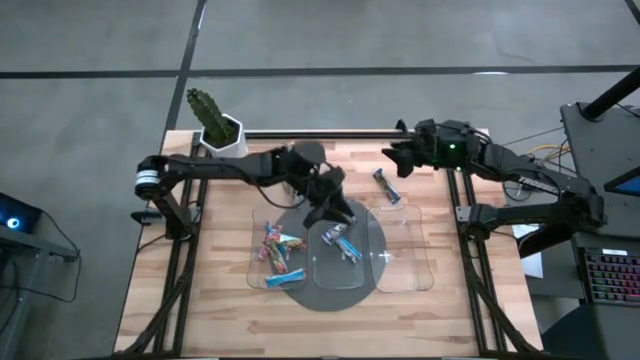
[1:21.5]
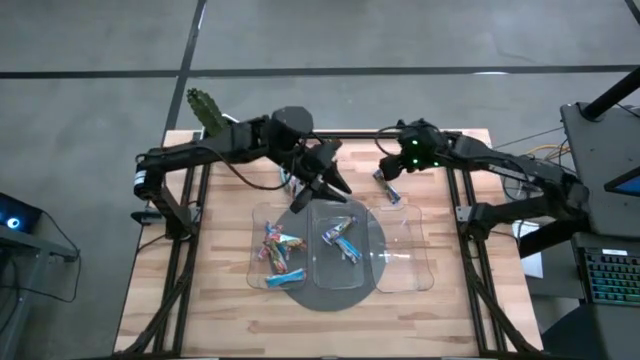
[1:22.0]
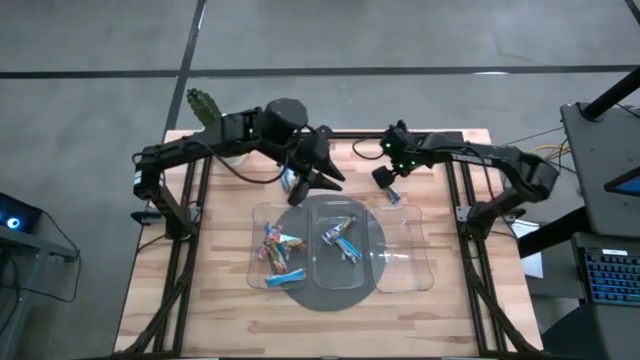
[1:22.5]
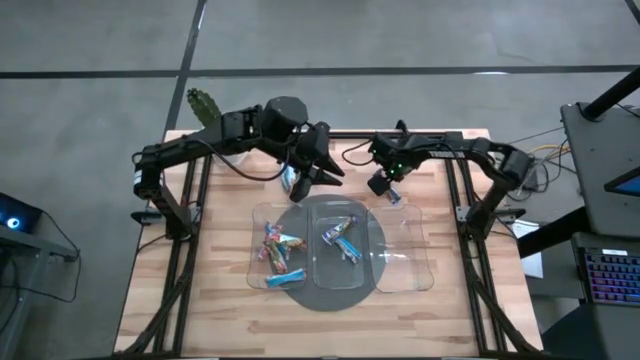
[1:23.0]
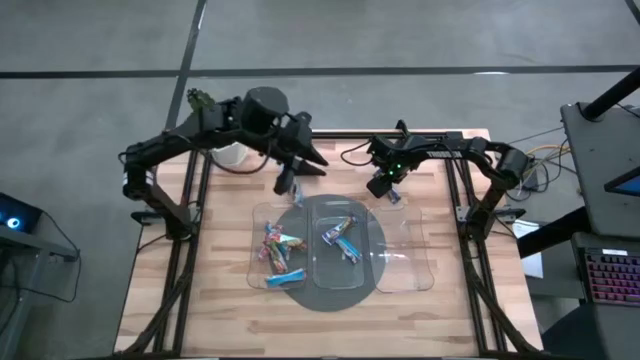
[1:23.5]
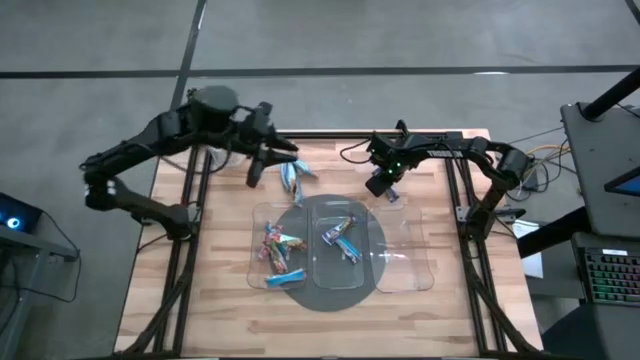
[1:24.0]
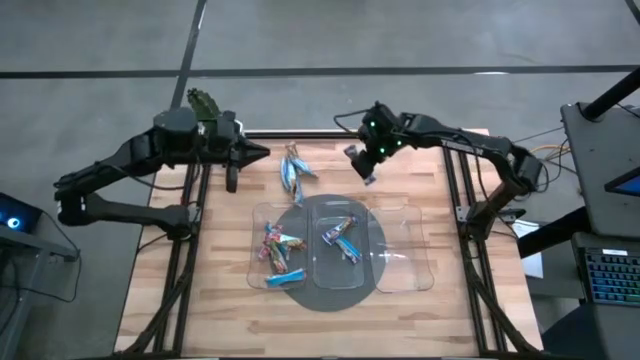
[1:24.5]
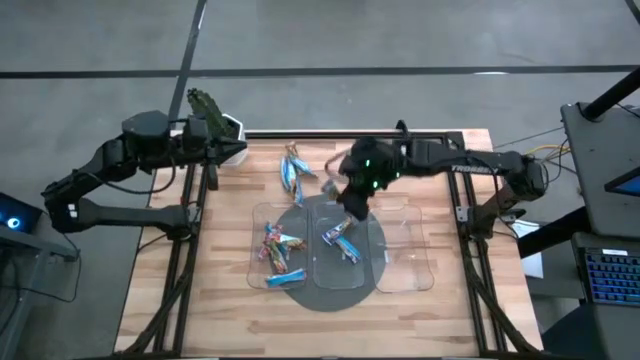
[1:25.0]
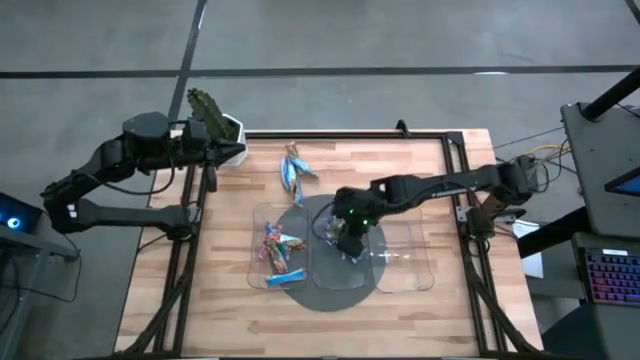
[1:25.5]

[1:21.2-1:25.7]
Task: Pick and place Granola Bars by type
Put the blue granola bar into the middle transparent bin

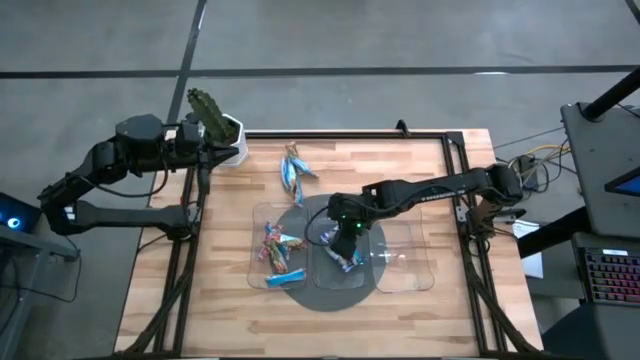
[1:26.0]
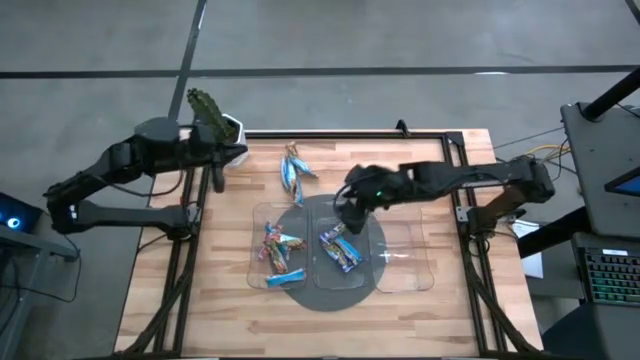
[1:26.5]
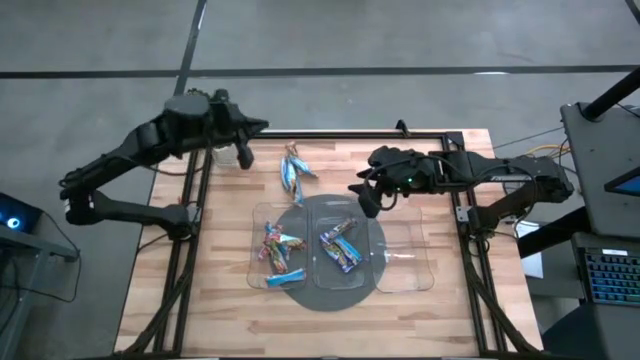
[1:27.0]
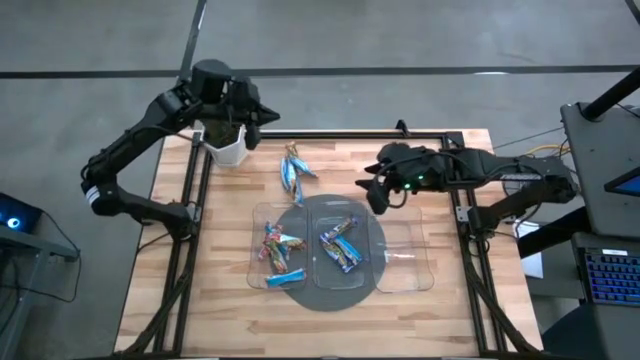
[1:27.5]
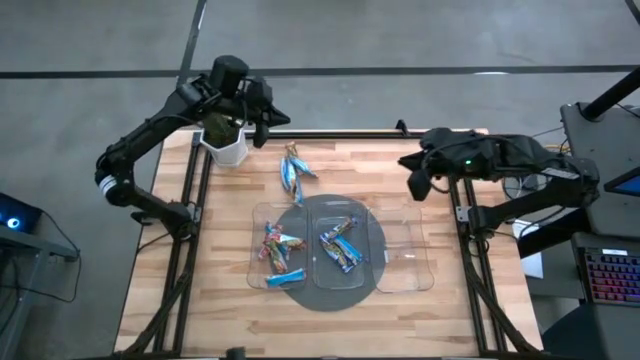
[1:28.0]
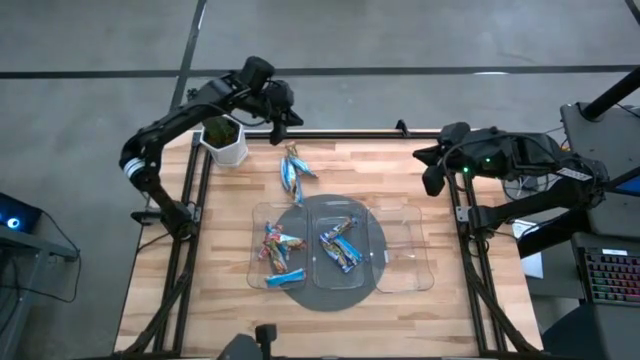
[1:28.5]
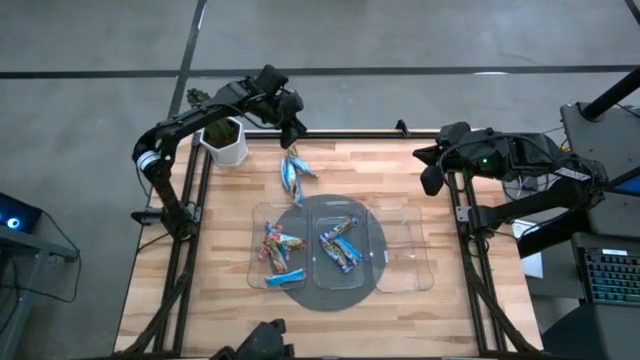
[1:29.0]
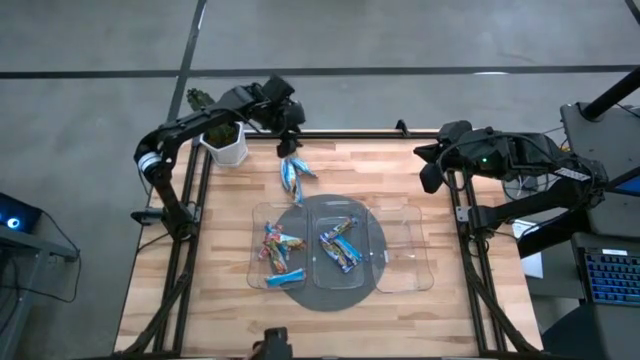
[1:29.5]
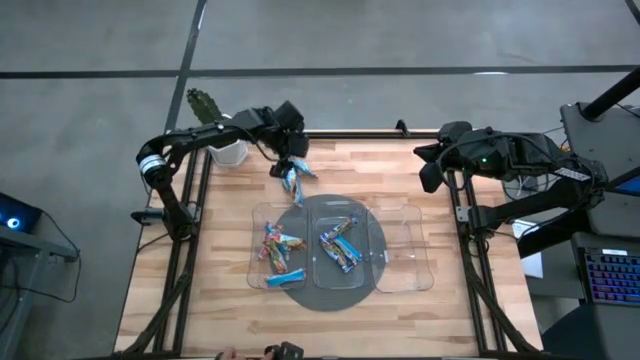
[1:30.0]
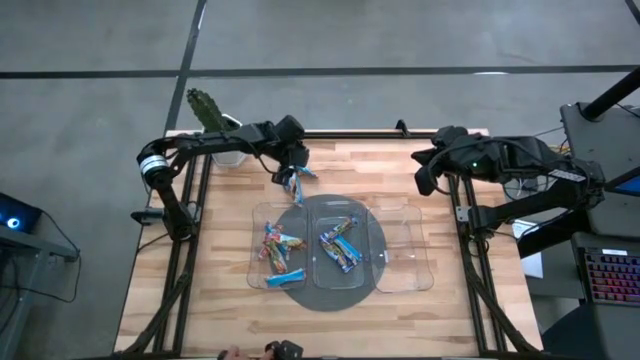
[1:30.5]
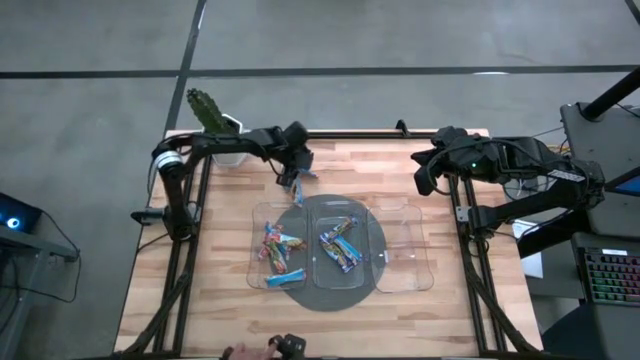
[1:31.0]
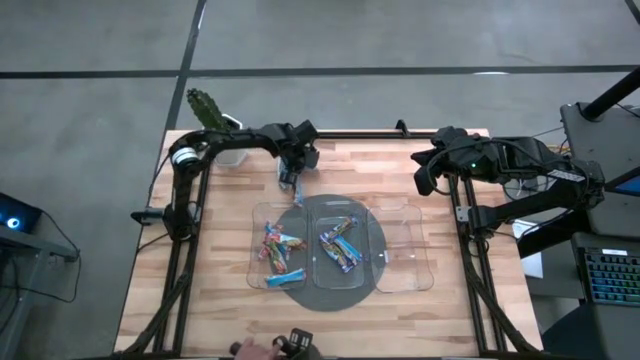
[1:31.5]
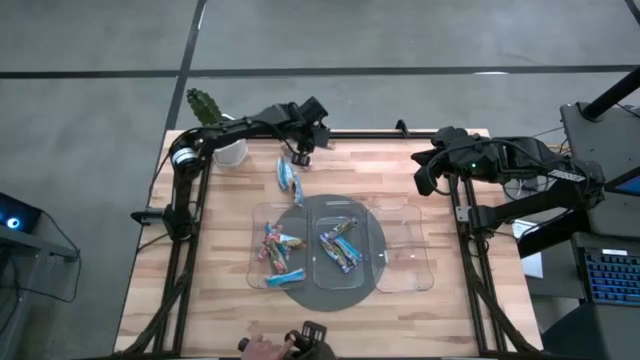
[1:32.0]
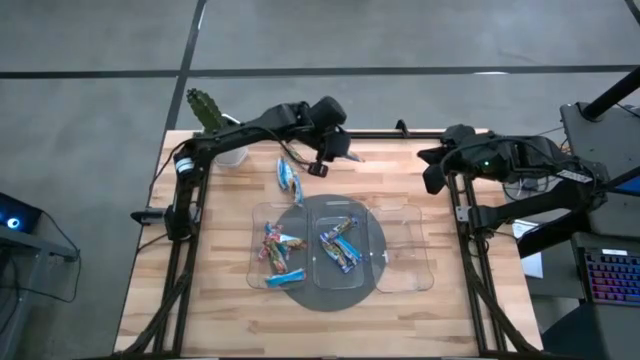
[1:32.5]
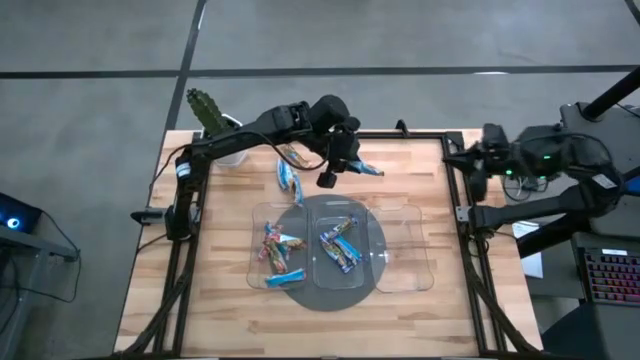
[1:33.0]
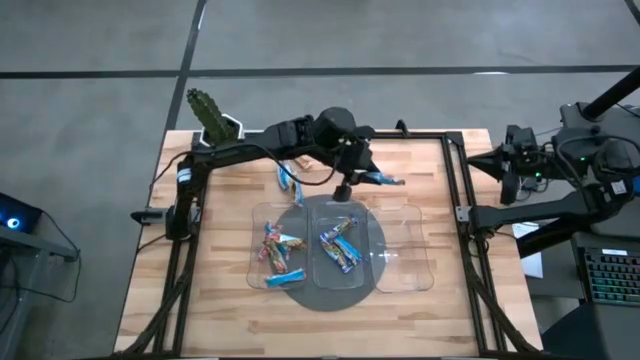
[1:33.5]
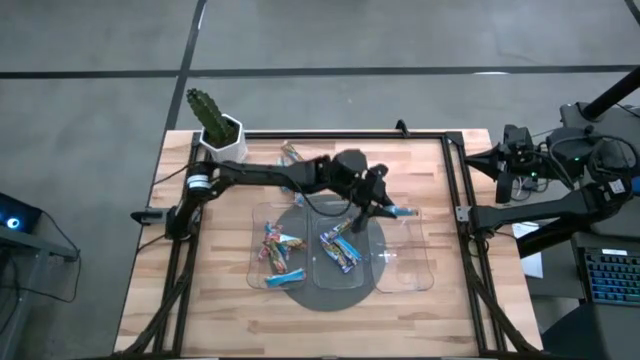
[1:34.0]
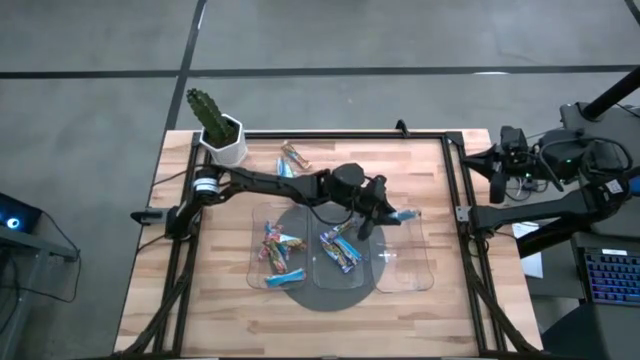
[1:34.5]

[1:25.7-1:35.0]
Put the yellow granola bar into the right transparent bin

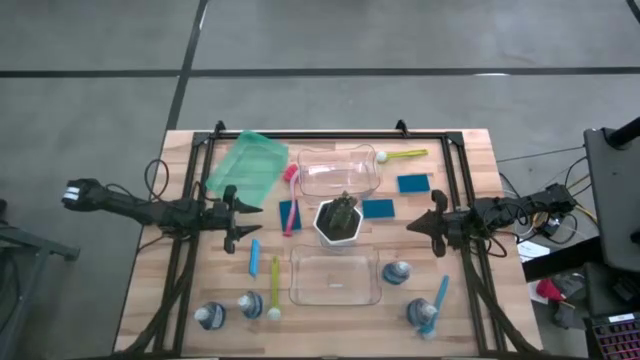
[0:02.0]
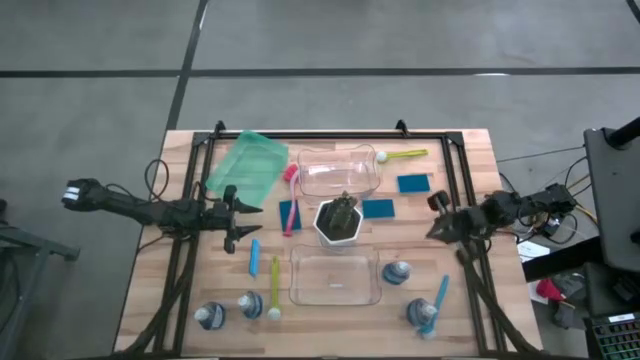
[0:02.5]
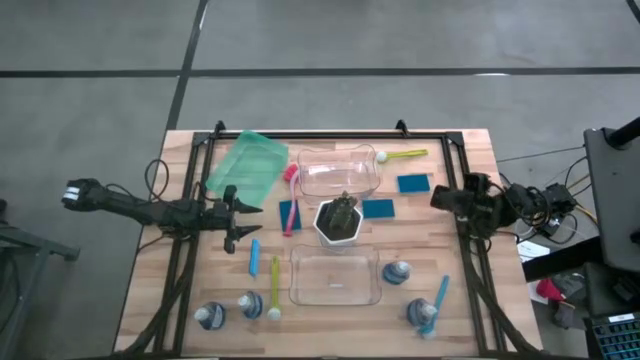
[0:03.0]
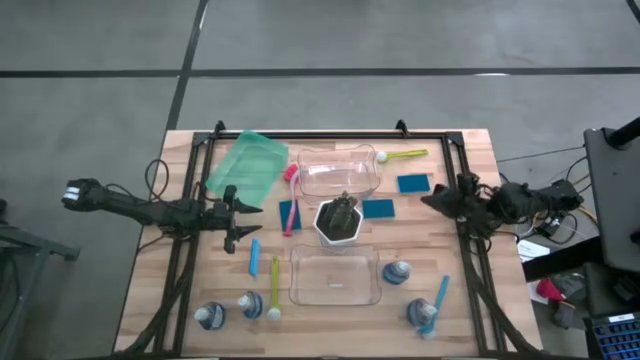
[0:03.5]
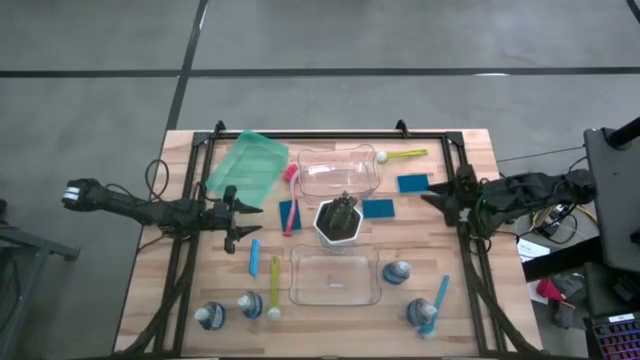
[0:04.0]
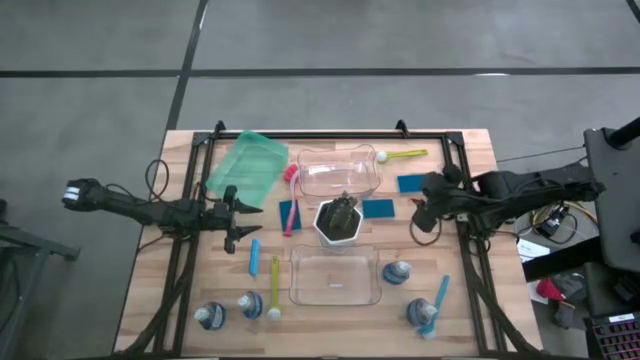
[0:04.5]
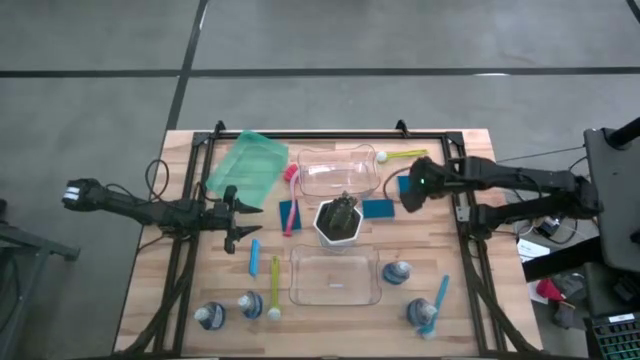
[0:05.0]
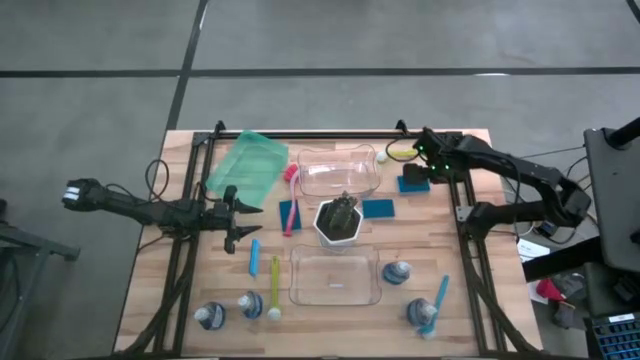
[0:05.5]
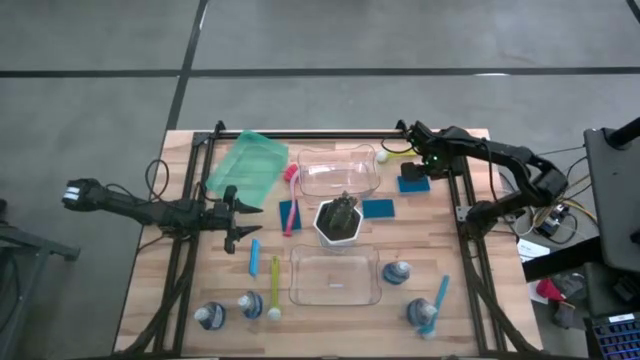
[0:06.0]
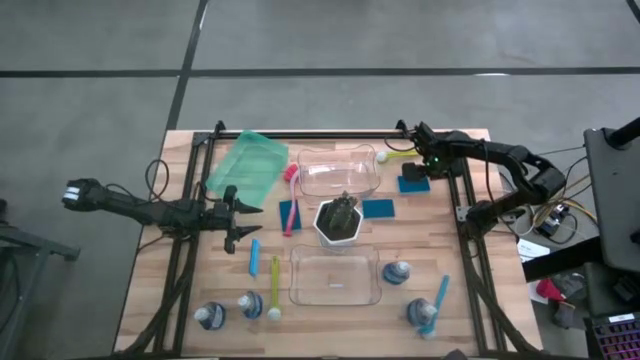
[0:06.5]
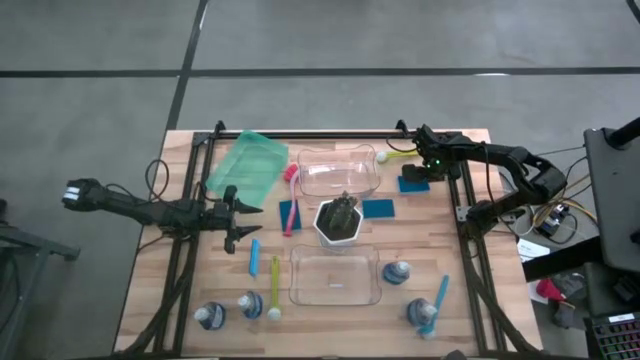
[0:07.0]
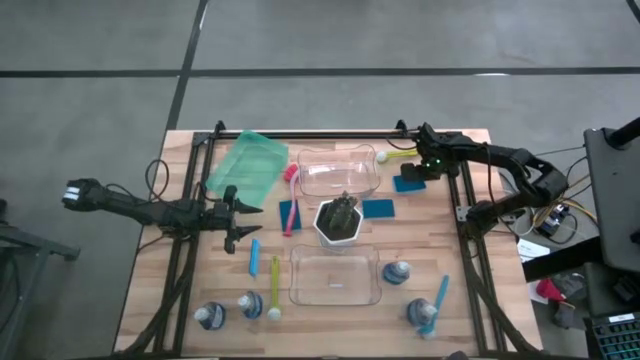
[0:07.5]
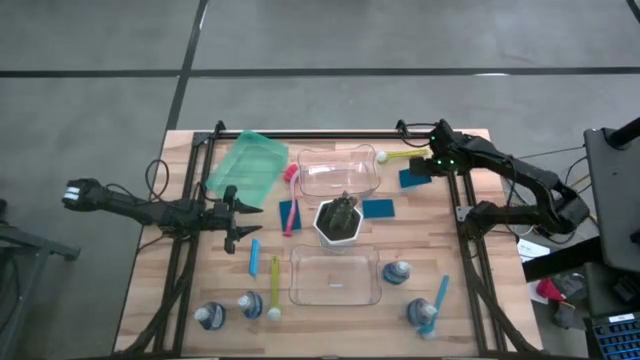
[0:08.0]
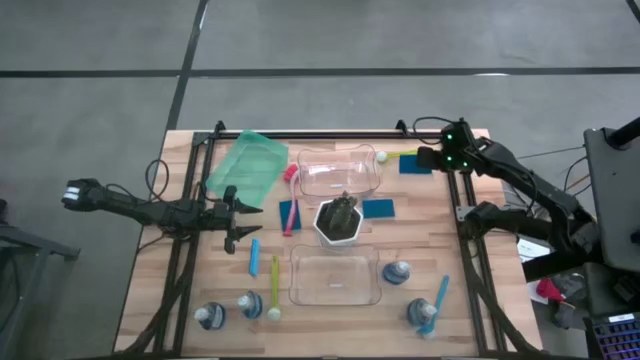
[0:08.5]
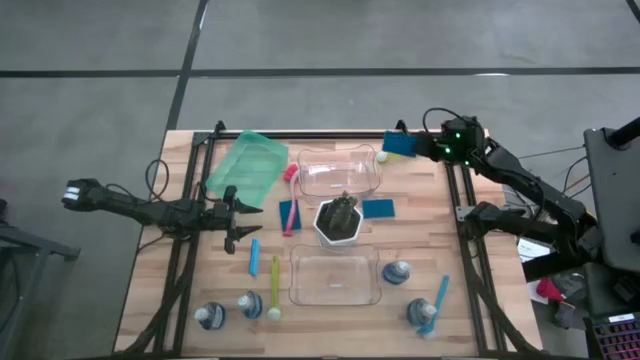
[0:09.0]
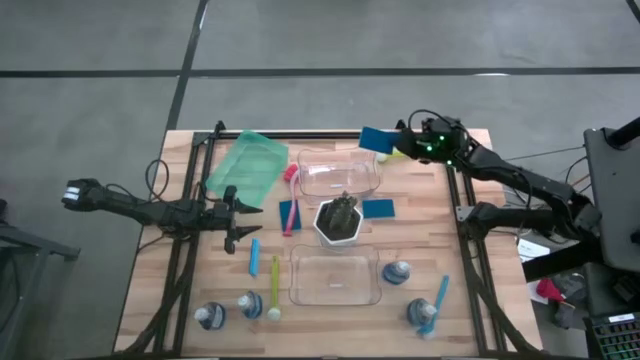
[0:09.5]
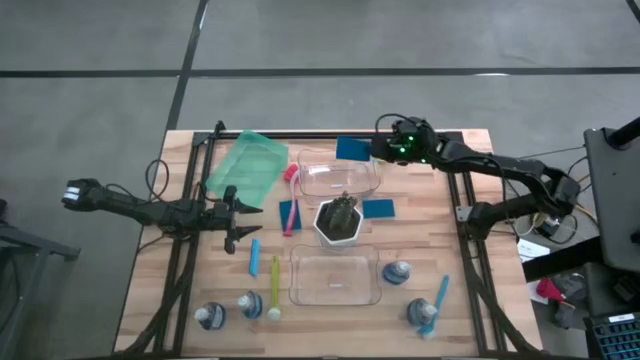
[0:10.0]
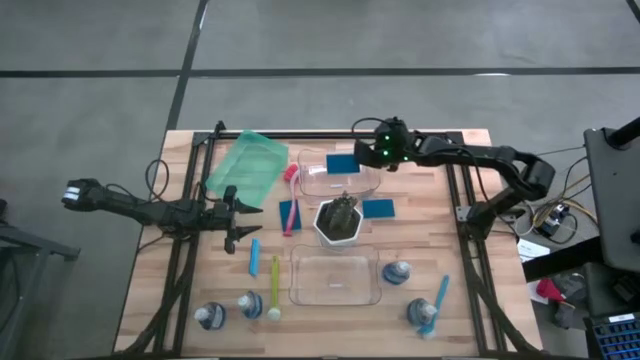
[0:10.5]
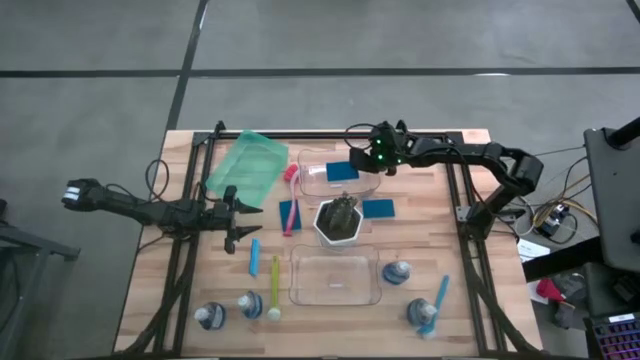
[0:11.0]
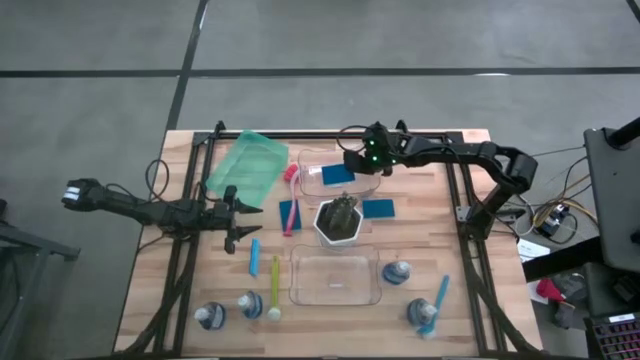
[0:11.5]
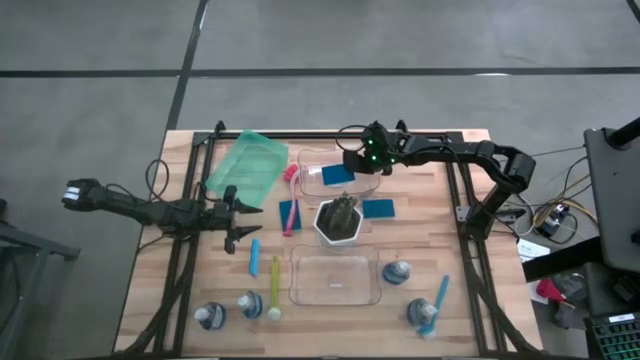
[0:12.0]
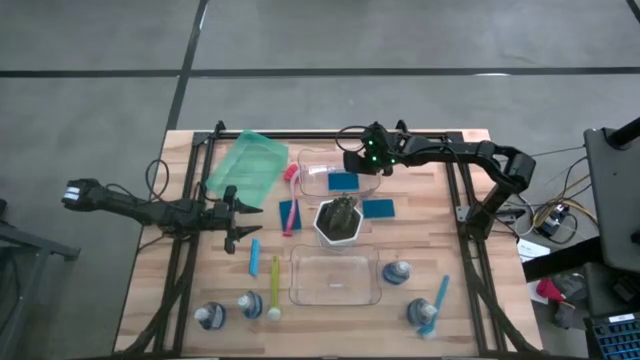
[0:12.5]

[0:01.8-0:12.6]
Task: Pick & Place Kitchen Sink Supplies
Put the blue sponge wipe into the top transparent bin
